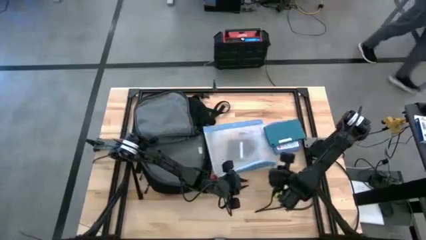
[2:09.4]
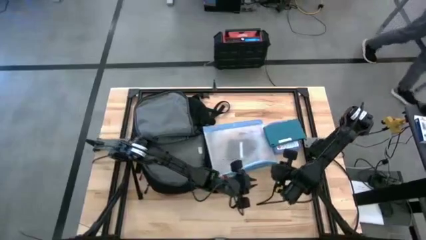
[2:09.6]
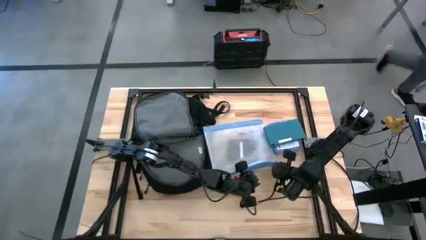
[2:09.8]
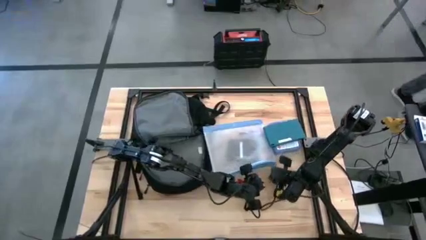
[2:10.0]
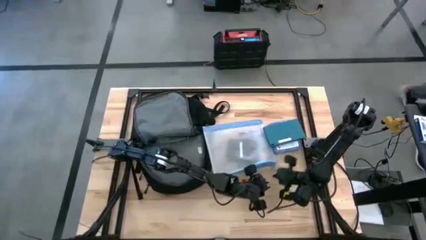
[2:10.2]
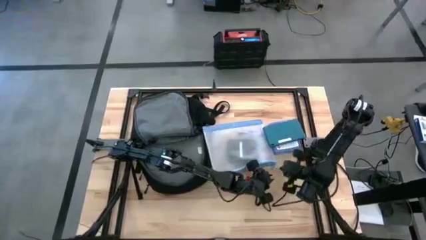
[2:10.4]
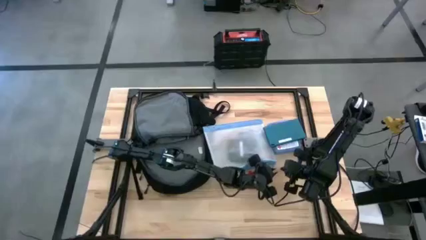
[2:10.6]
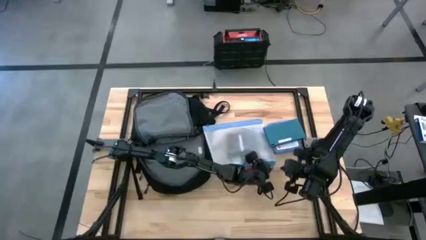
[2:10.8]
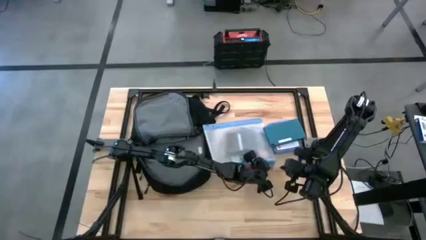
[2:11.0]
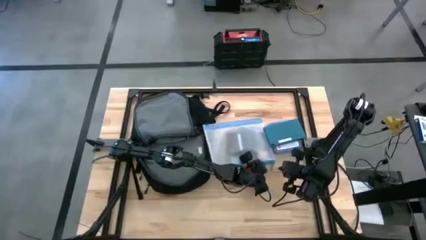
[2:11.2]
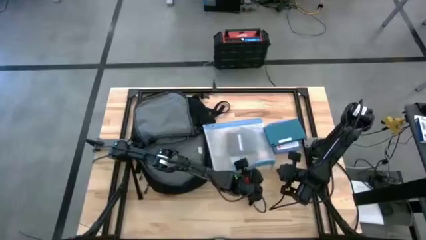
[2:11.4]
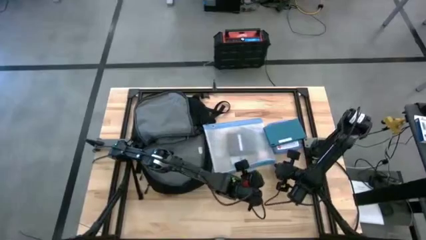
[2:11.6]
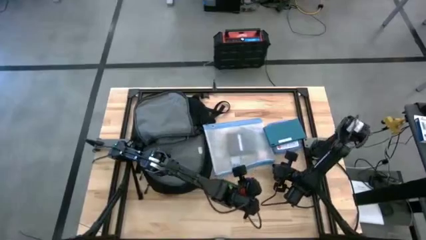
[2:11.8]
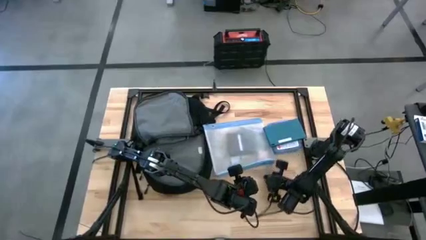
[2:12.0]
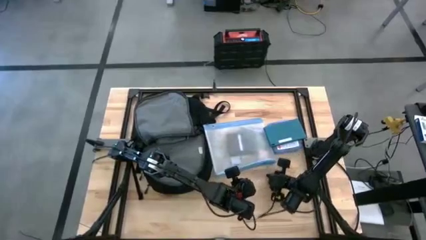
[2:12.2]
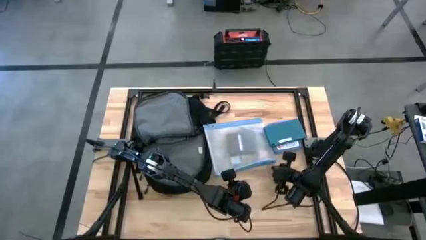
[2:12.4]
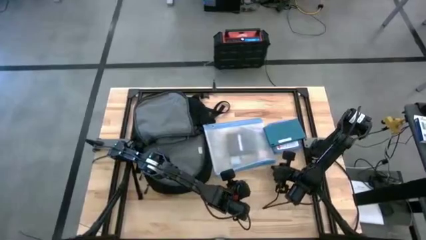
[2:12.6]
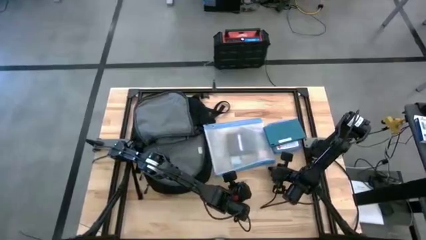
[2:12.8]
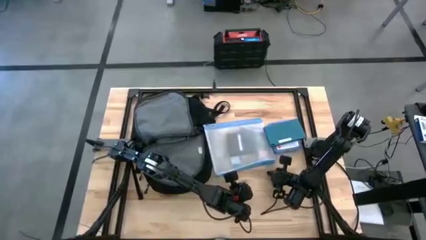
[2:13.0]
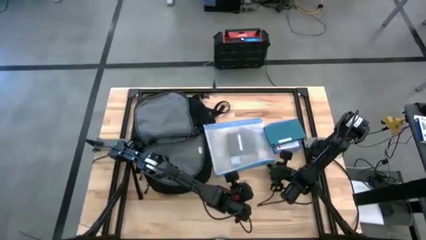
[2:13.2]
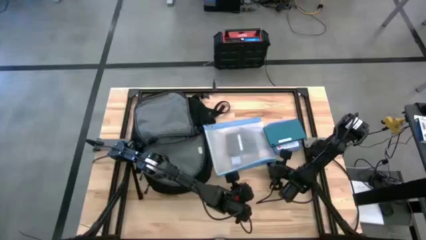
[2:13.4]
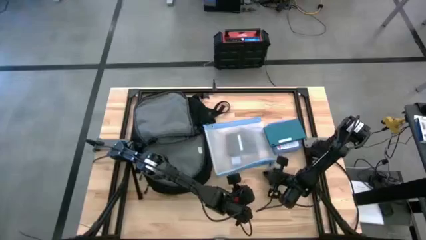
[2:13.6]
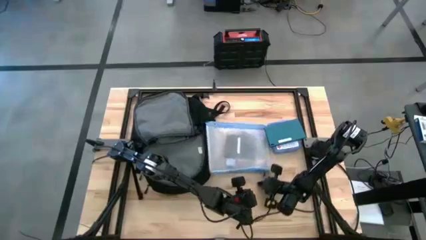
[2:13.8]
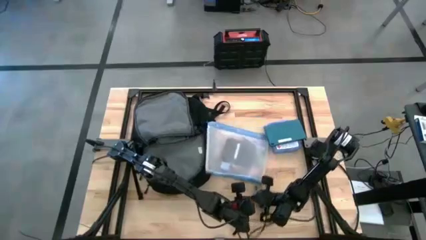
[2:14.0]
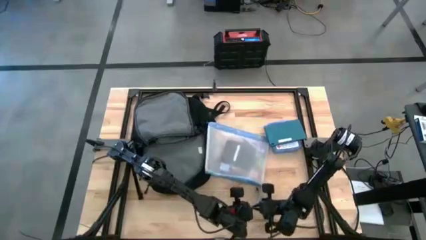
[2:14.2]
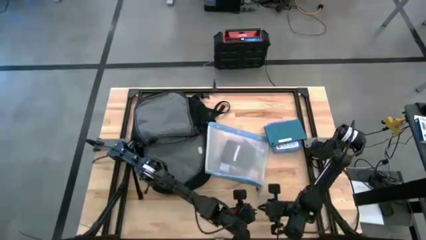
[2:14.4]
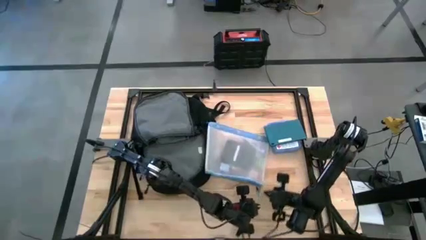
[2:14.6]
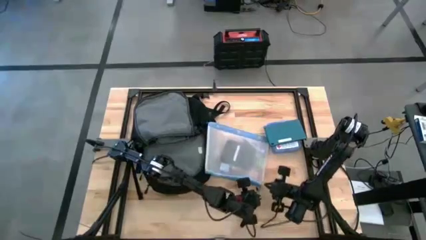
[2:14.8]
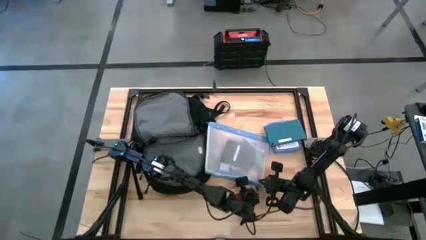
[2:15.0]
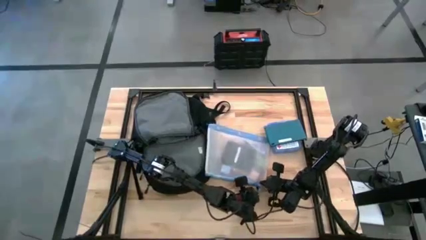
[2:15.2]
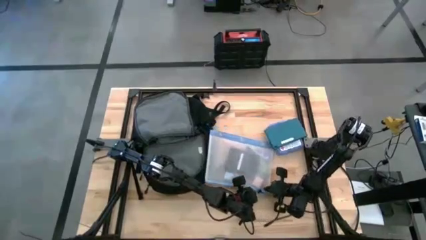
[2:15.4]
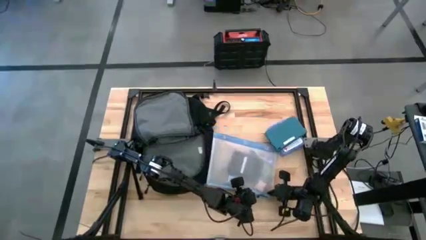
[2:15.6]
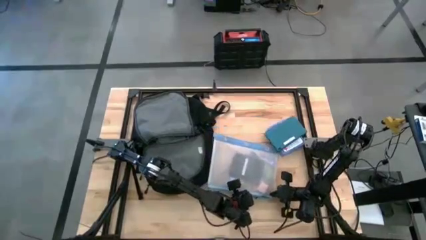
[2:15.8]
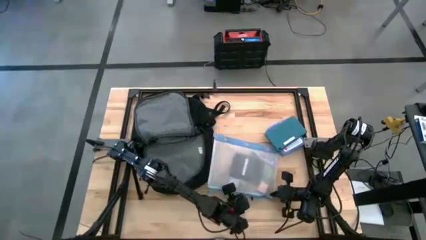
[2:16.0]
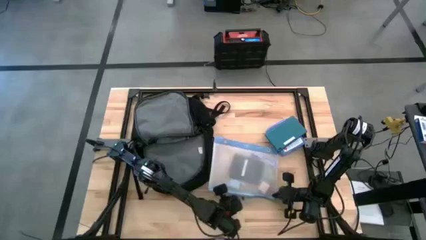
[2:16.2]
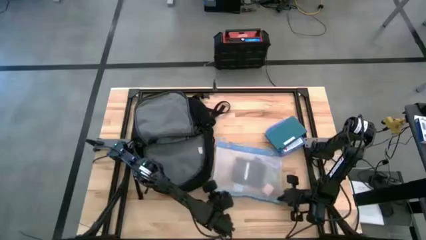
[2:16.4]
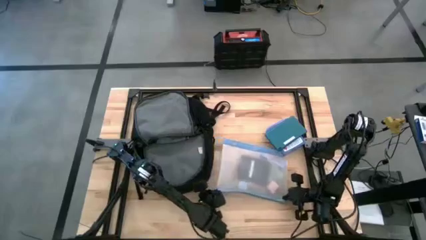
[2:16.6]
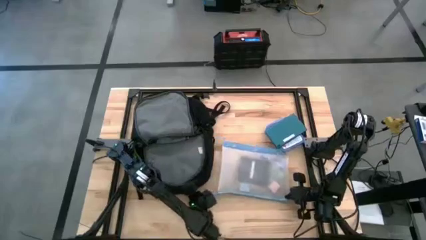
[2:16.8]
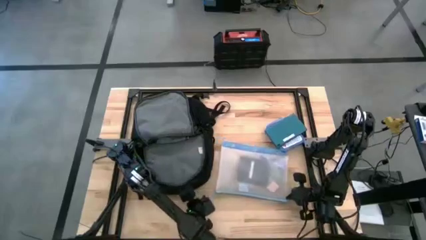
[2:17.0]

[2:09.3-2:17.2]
Task: Unpack backpack
Close the white mesh zipper pouch

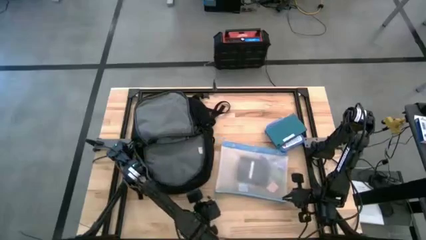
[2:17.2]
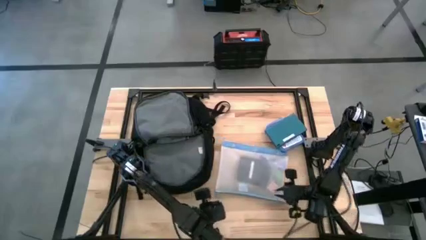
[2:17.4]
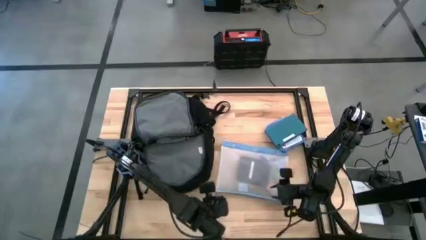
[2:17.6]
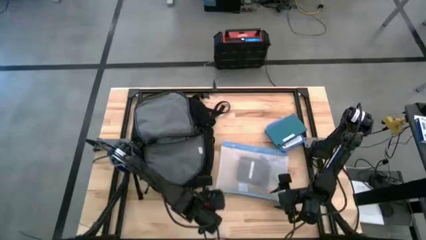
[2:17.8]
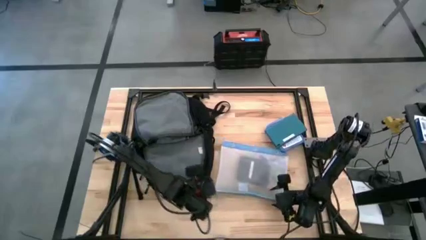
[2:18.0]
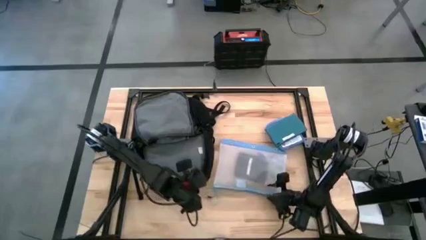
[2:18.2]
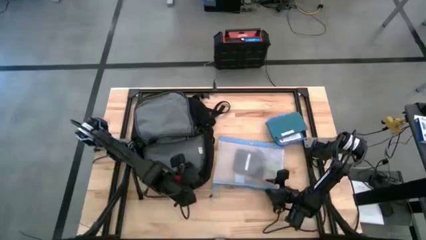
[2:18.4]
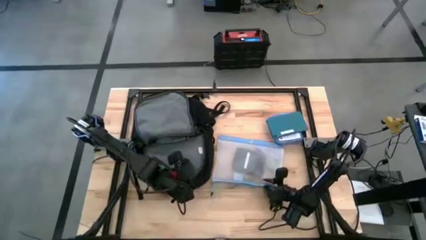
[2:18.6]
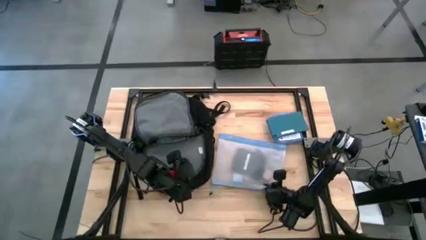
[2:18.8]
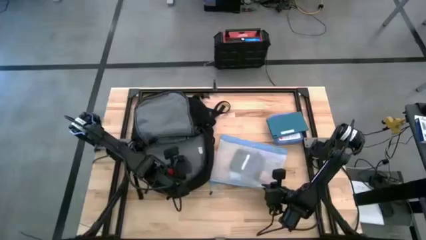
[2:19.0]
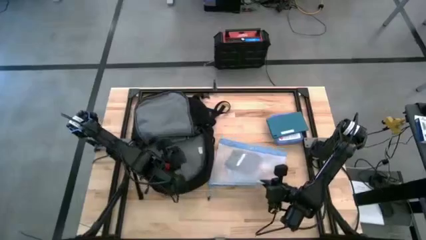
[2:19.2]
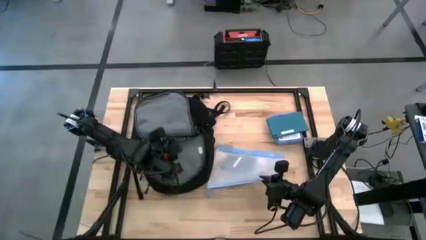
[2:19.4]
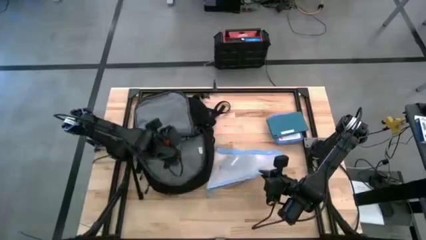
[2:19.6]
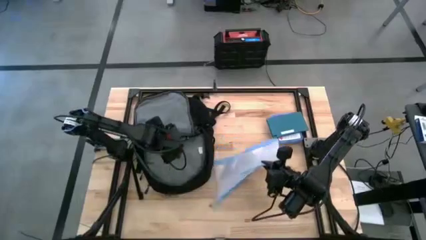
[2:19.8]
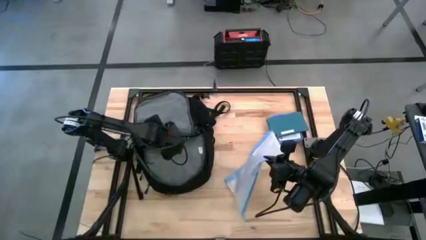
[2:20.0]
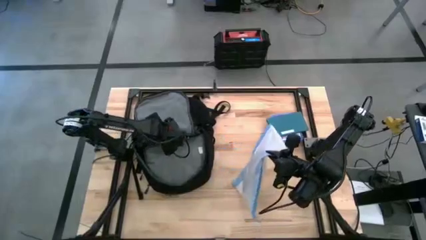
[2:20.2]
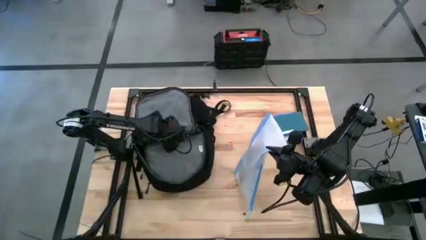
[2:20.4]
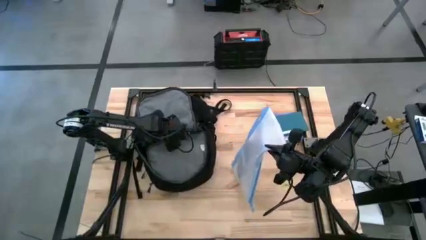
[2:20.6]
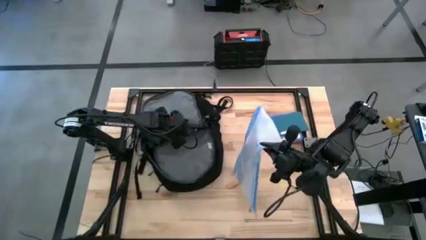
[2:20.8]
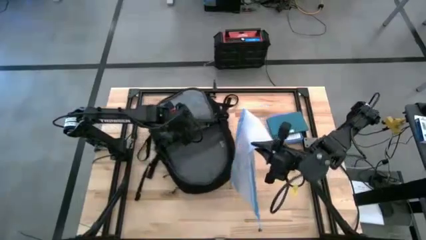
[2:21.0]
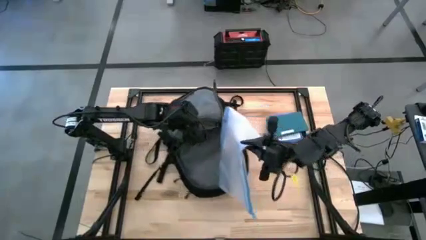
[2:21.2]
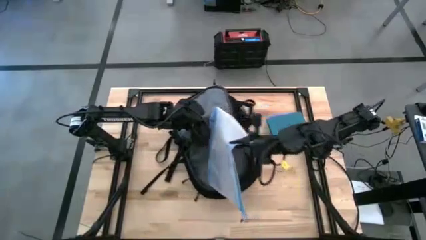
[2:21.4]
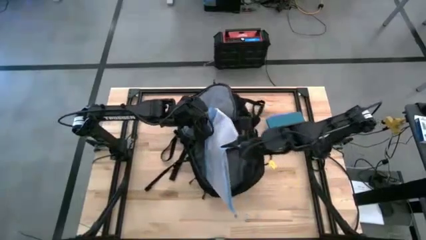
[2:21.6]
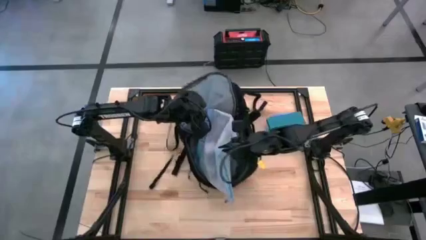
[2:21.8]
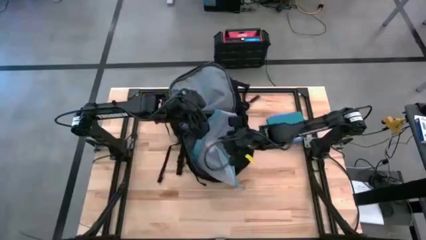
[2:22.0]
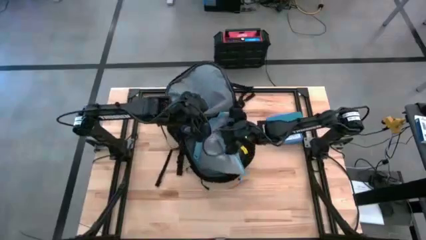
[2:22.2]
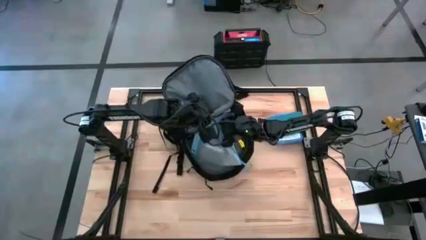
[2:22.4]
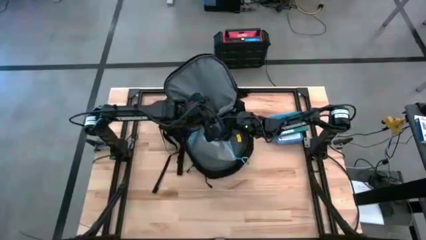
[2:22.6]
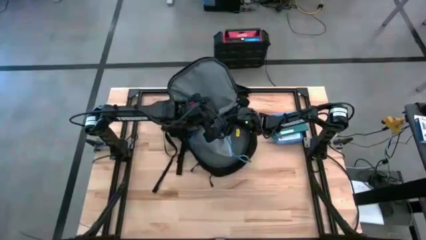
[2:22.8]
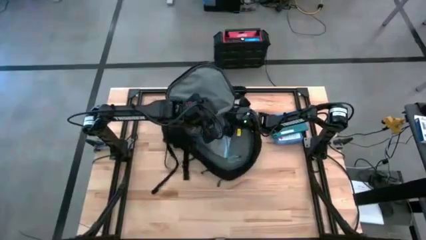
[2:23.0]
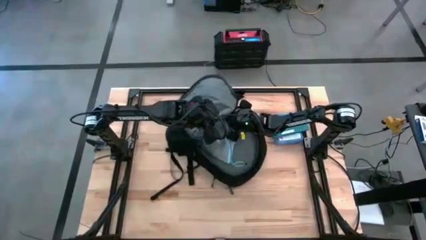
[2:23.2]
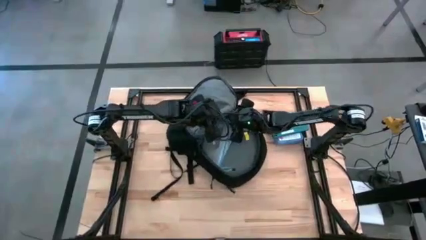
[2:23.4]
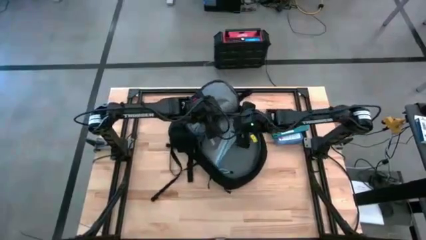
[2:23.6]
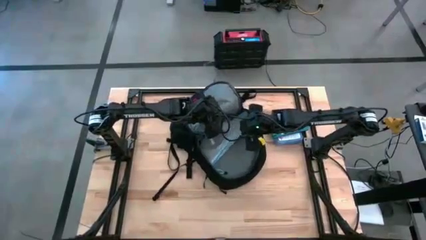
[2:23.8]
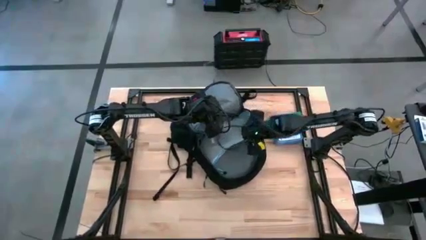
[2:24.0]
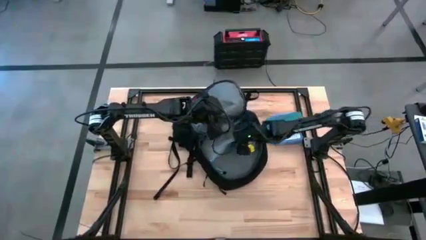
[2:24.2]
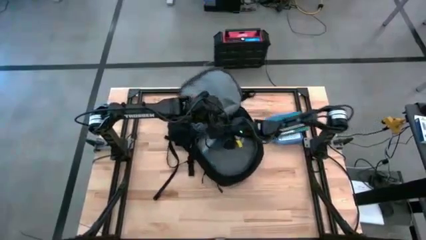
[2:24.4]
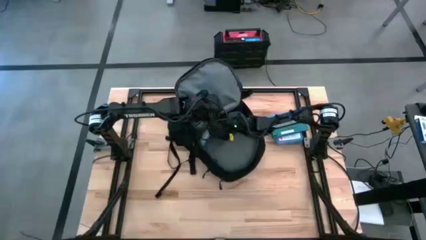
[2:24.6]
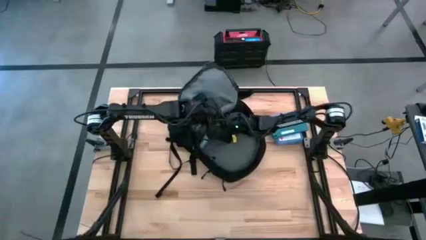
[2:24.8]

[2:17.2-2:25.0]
Put the white mesh zipper pouch into the black backpack

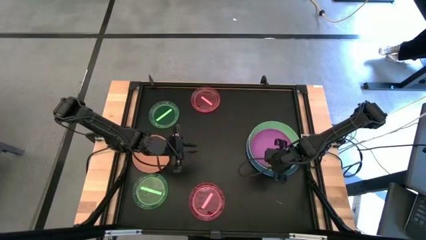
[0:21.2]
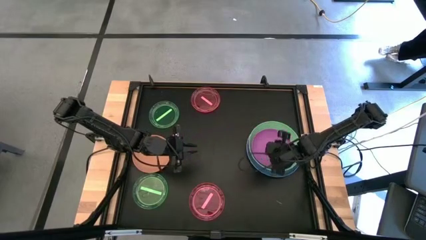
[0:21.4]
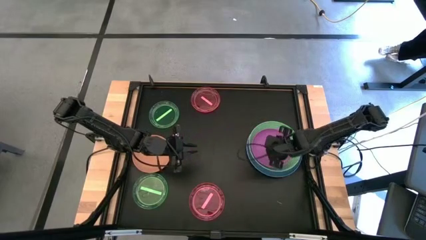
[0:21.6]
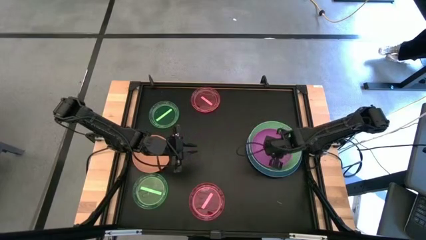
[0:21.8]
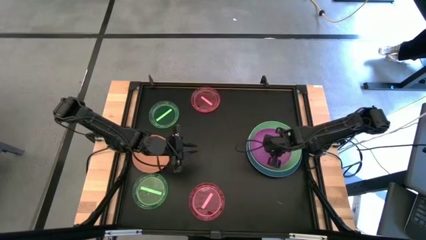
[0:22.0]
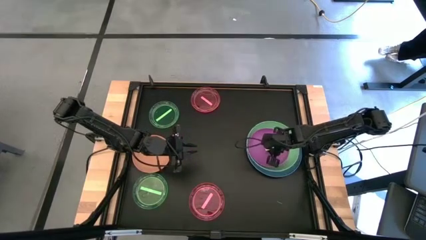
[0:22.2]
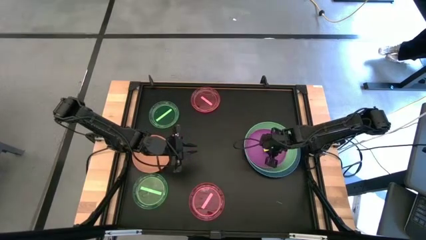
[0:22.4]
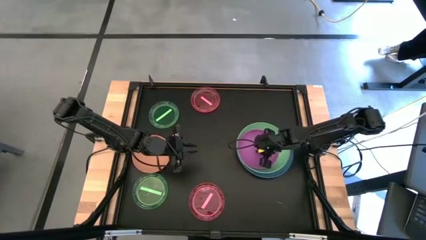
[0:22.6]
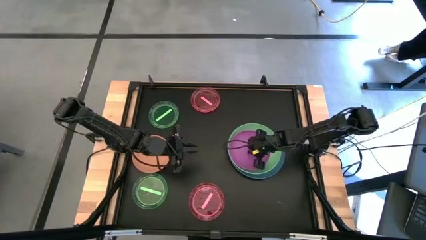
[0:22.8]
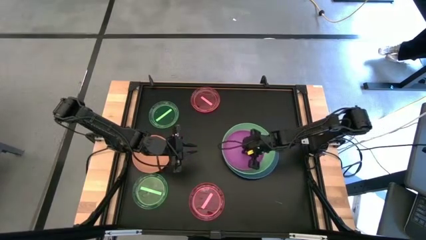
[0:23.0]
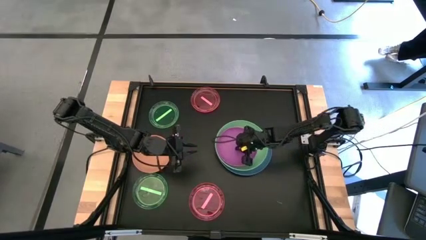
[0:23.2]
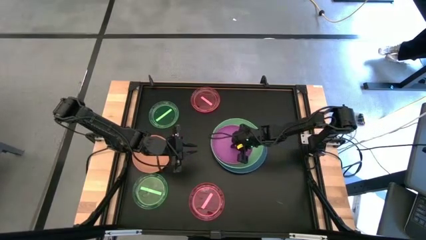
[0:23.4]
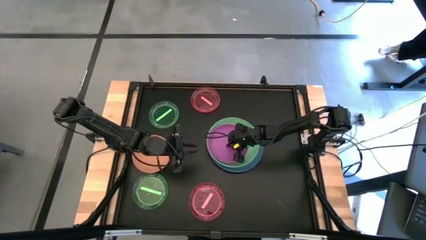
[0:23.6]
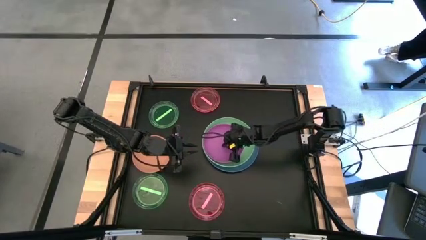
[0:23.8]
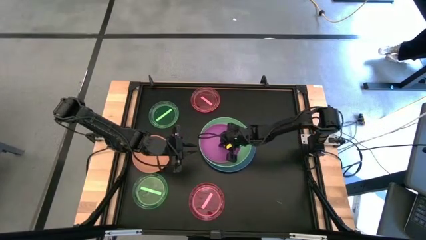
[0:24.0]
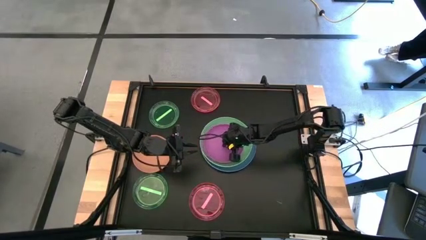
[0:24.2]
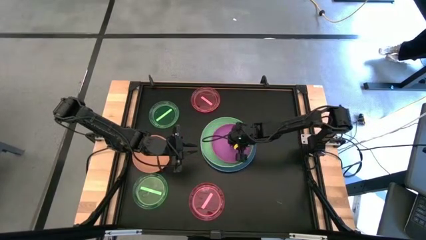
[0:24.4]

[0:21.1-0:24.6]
Task: Stack plastic plates
Move the stacked plates to the center of the table
